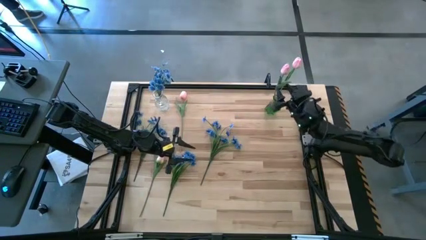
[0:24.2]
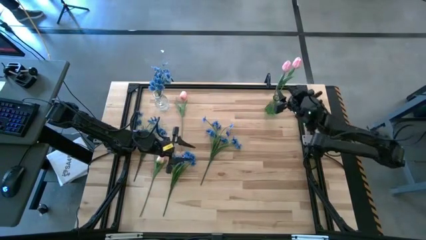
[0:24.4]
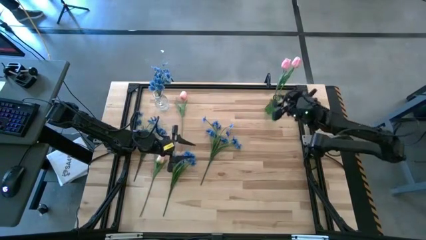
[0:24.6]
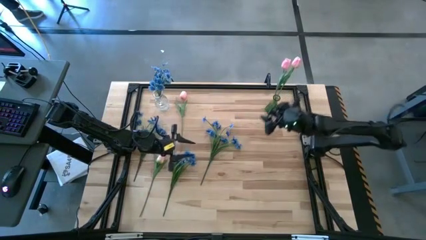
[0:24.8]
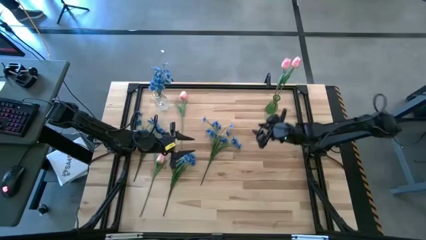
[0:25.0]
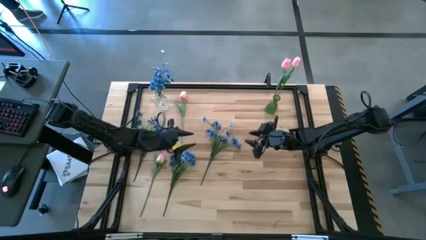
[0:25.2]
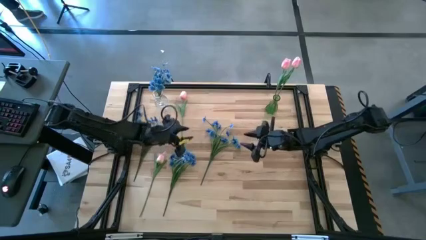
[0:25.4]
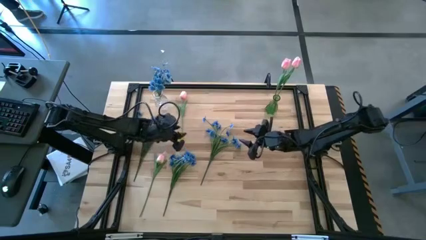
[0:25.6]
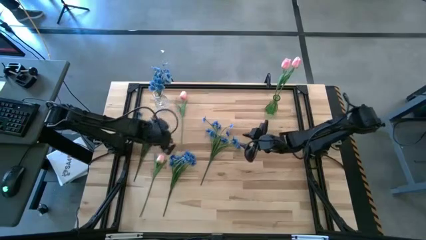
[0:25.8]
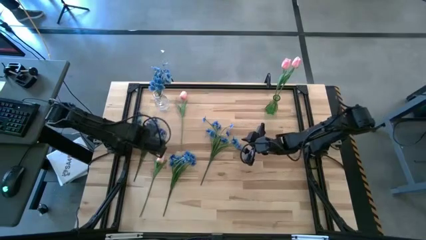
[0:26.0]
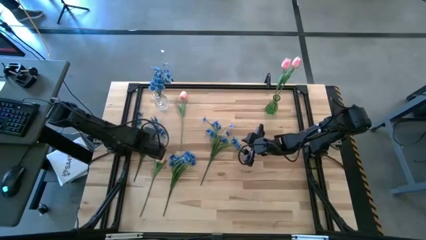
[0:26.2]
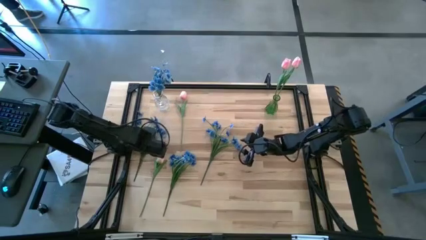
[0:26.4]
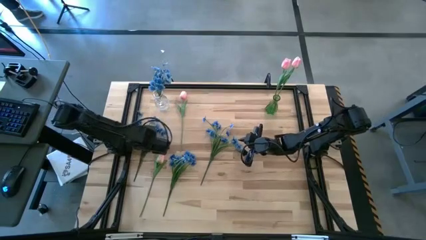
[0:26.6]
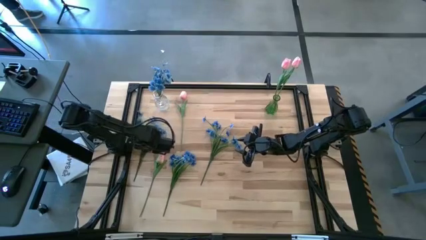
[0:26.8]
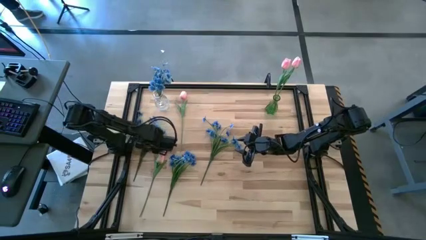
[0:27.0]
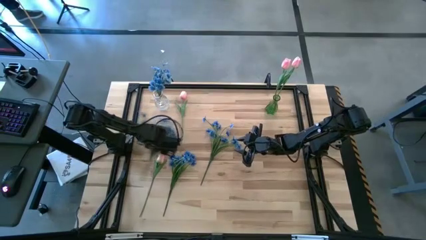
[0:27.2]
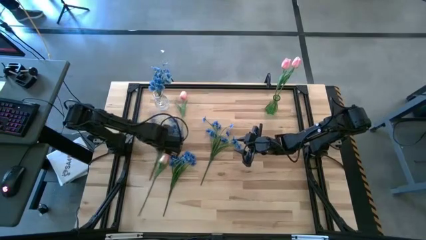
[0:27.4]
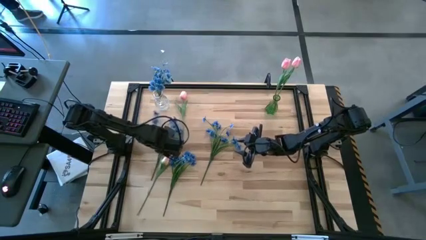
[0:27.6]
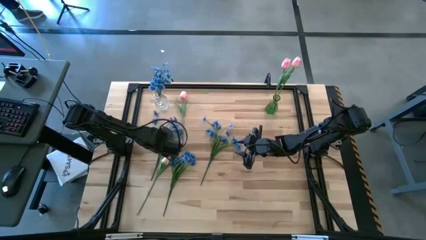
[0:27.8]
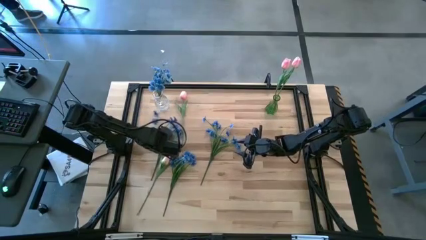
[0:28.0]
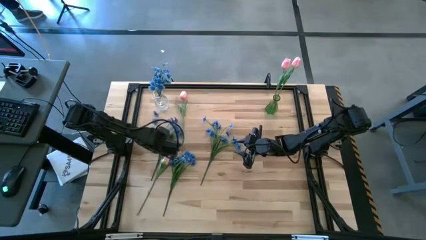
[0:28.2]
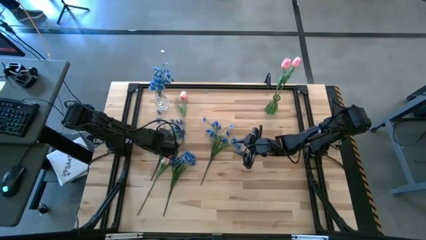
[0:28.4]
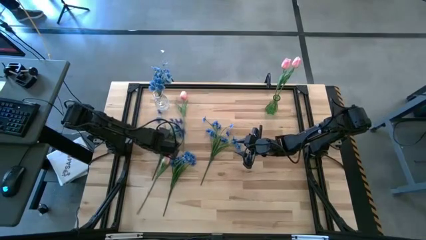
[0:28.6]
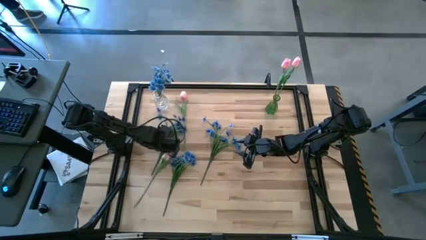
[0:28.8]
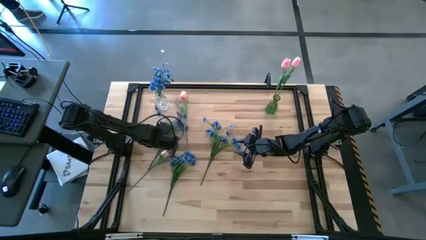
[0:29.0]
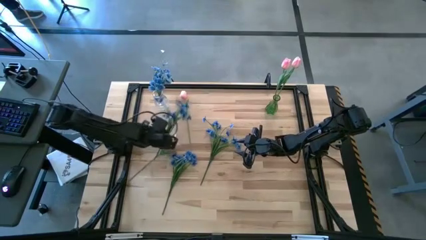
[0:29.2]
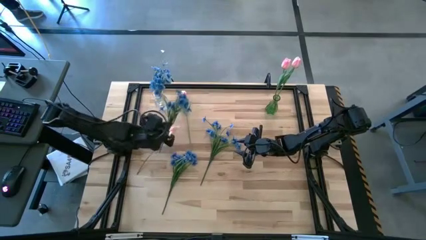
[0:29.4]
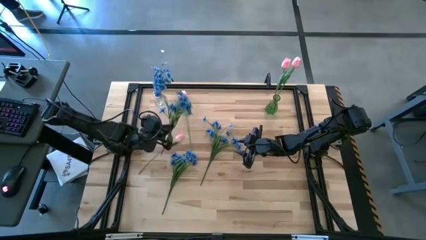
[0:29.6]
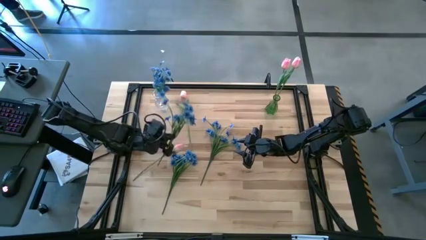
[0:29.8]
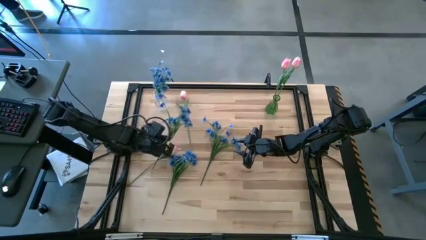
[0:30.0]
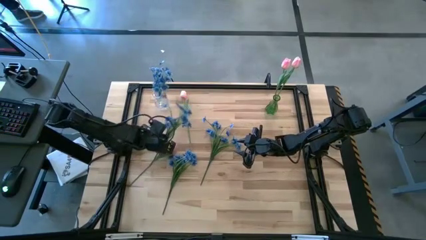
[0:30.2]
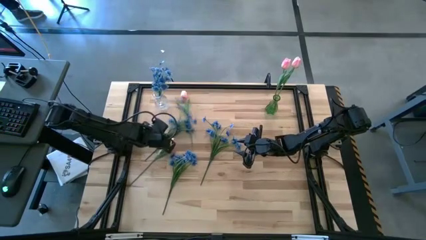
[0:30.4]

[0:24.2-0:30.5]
Task: Sort flowers into vase by color
Put the top left blue flowers into the transparent vase

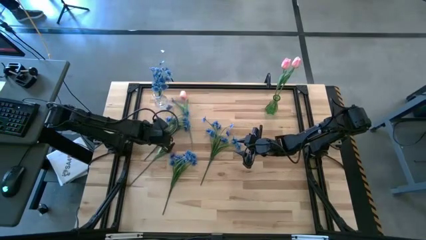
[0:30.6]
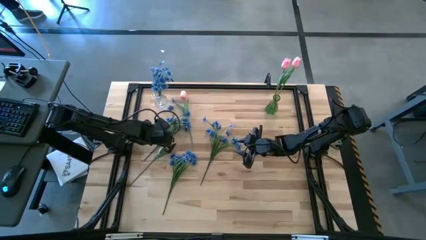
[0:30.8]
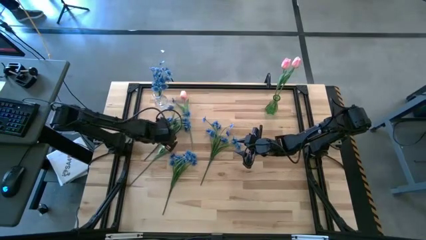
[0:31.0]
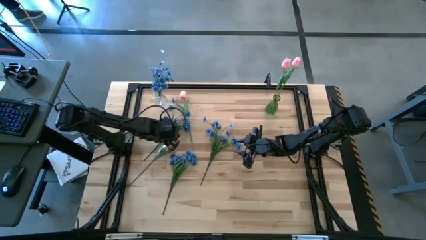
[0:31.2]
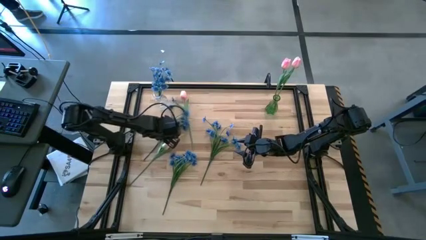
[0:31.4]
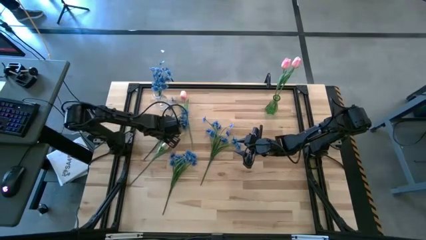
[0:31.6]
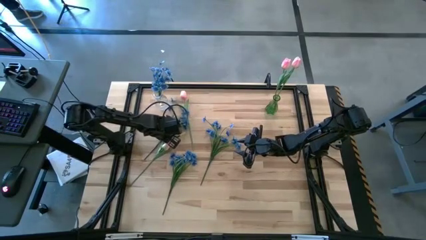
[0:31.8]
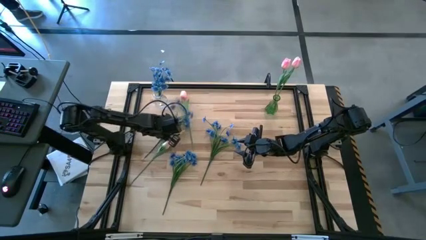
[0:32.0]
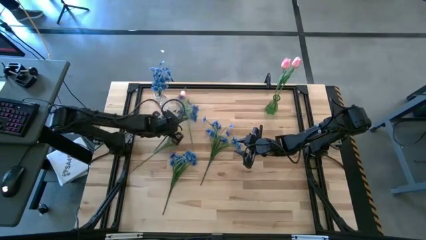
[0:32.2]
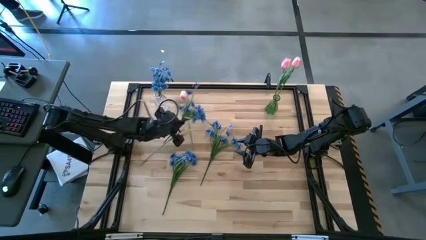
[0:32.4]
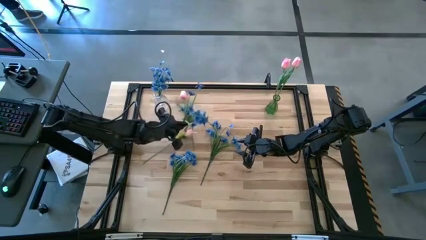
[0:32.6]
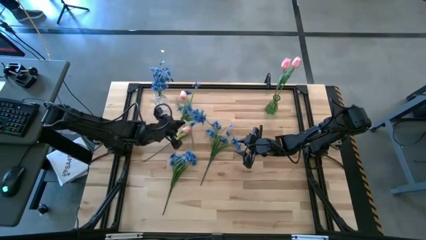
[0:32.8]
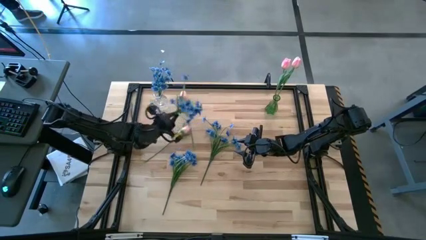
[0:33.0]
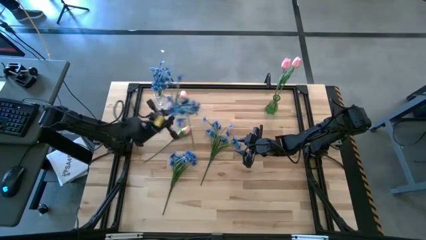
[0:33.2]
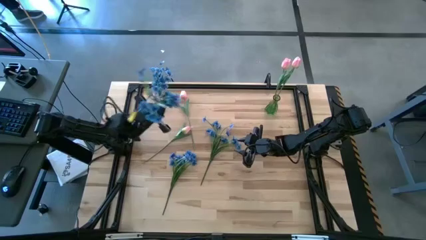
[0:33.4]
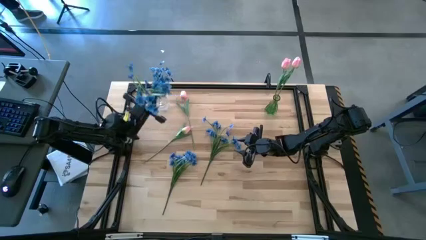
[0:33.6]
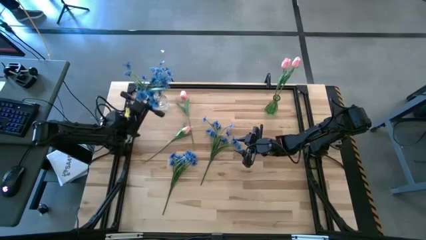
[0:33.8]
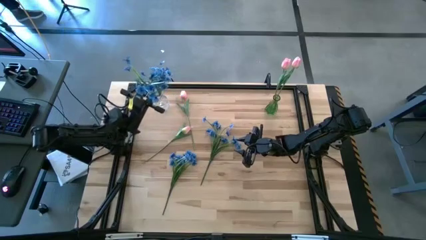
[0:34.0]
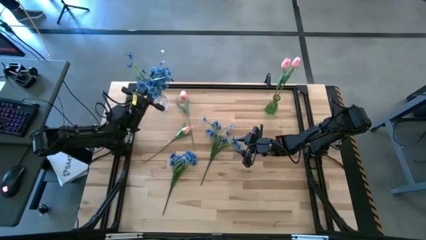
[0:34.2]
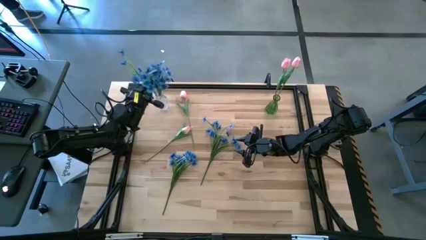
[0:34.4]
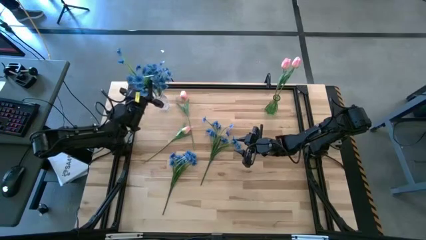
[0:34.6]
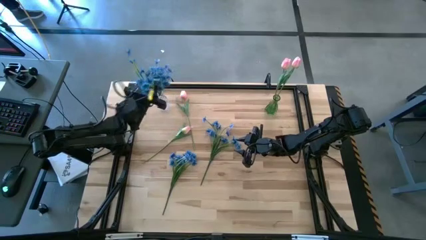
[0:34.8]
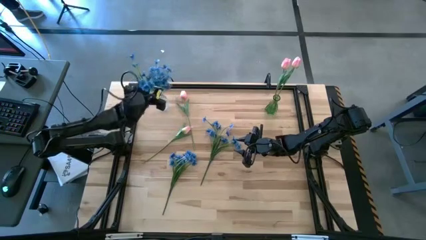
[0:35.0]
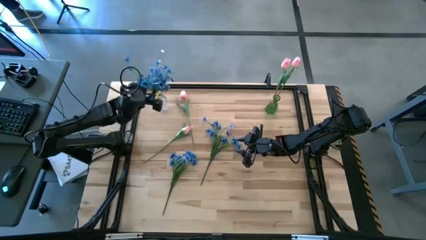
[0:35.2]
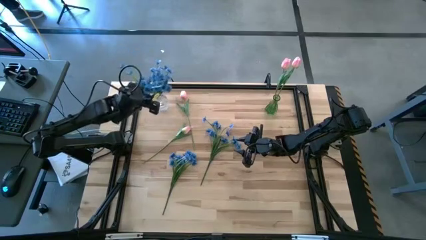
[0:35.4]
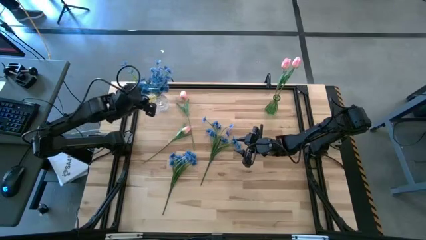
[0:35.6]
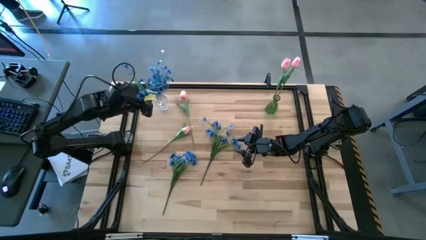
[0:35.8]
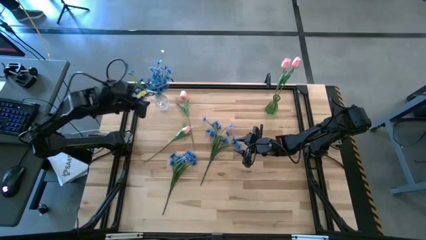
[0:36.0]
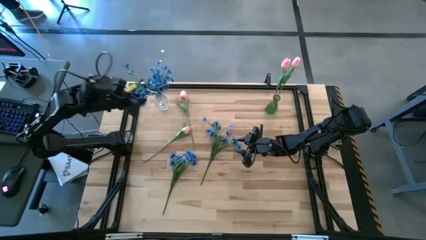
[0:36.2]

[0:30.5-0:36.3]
Put the top left blue flowers into the transparent vase

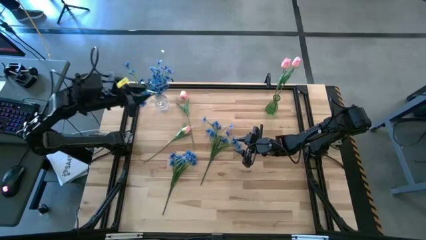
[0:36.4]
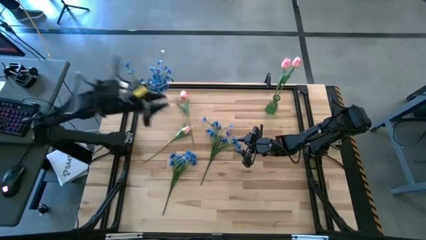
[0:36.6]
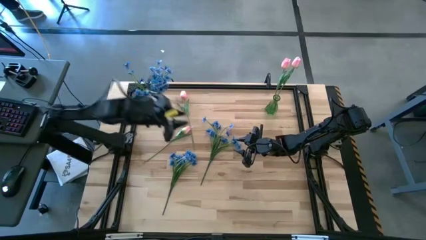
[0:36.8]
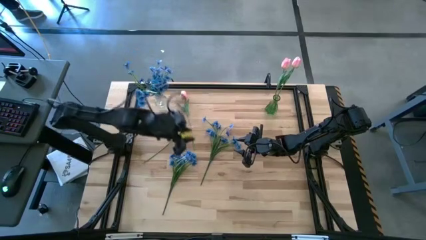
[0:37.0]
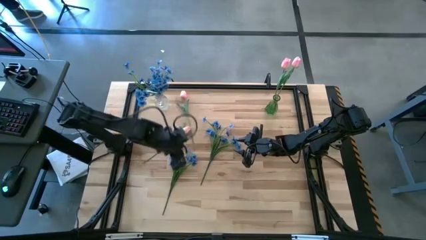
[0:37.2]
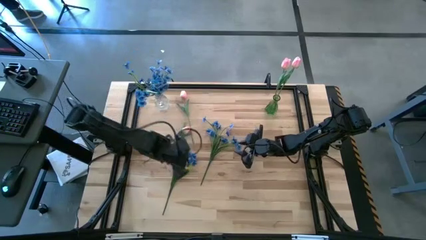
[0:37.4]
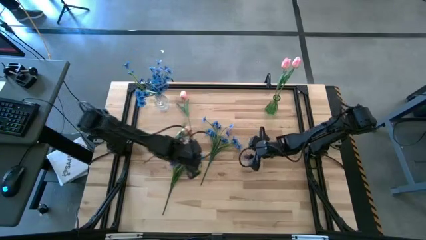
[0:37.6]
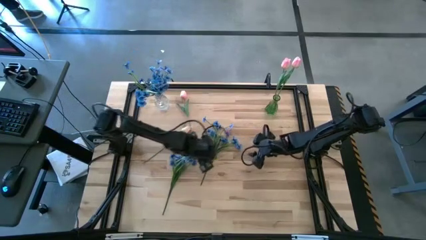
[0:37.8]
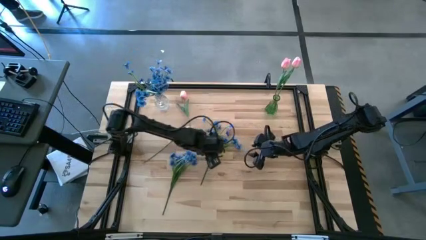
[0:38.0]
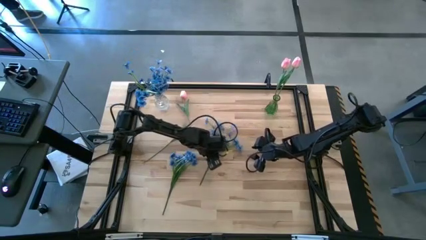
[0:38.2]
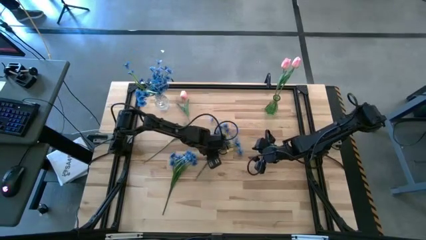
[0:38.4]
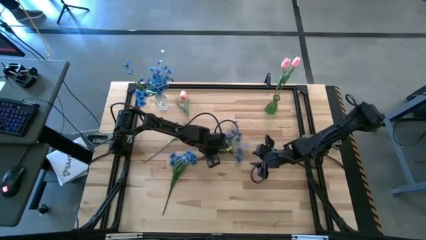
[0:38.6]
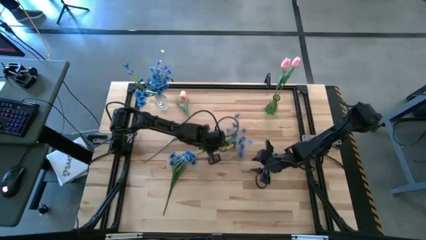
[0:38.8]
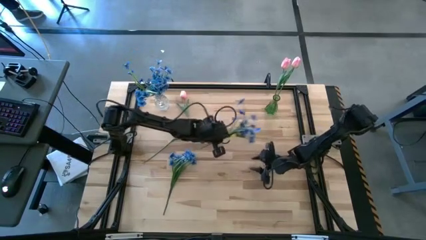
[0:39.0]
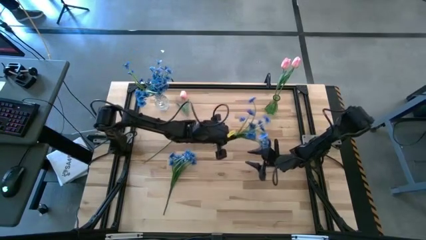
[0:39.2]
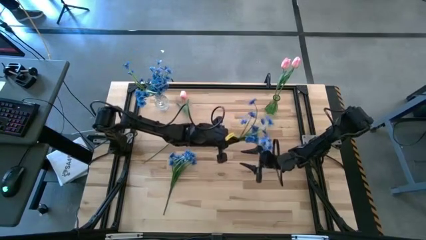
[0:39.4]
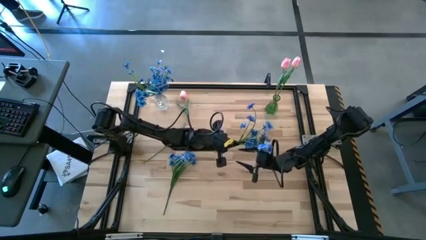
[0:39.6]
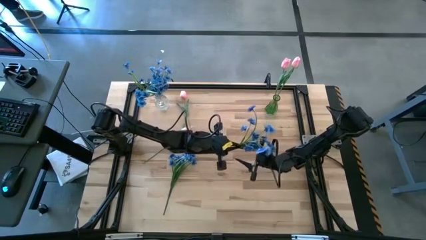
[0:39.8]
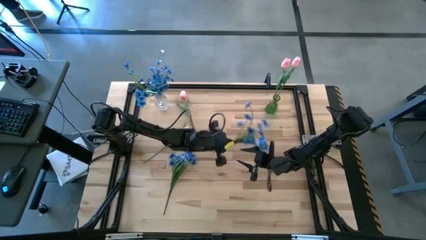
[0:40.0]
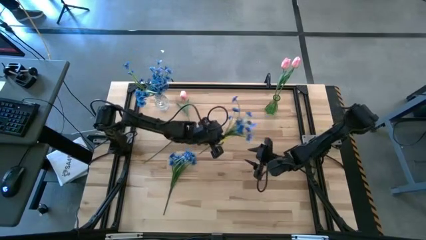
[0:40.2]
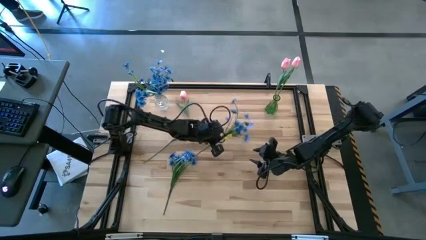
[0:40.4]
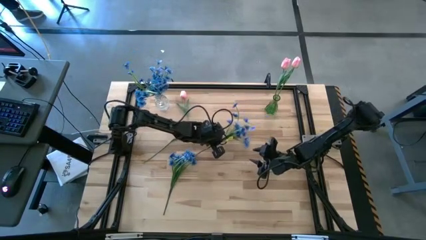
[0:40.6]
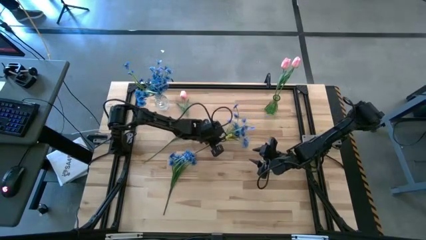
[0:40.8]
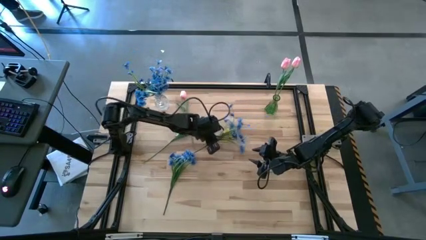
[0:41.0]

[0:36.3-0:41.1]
Put the right blue flowers into the transparent vase
